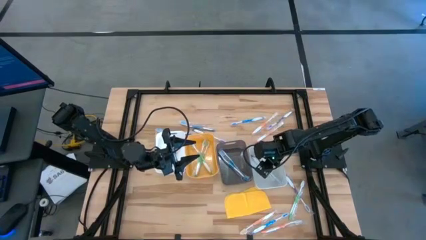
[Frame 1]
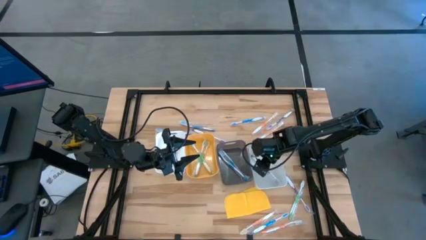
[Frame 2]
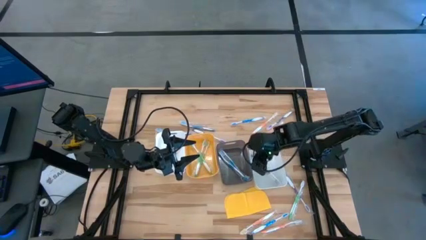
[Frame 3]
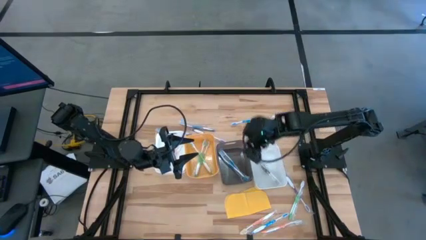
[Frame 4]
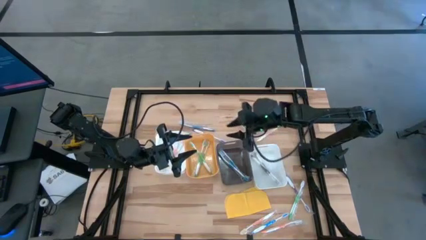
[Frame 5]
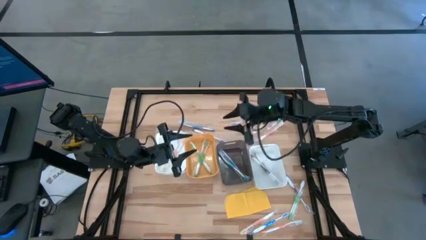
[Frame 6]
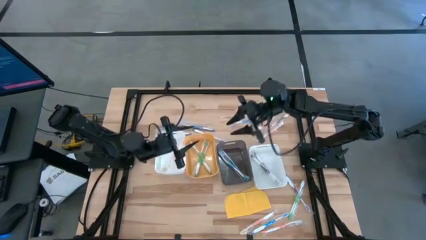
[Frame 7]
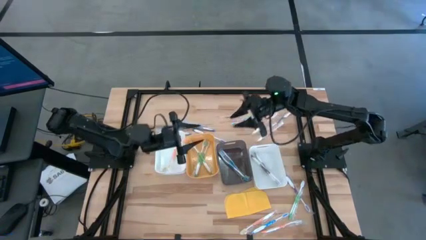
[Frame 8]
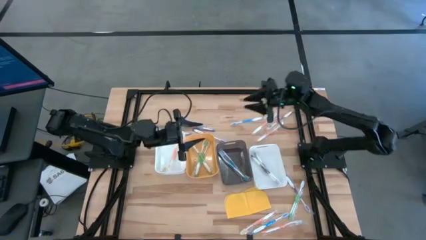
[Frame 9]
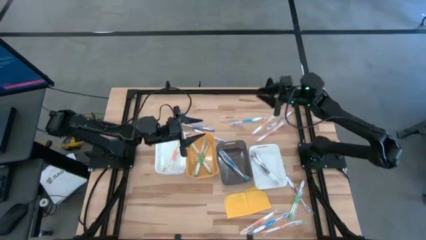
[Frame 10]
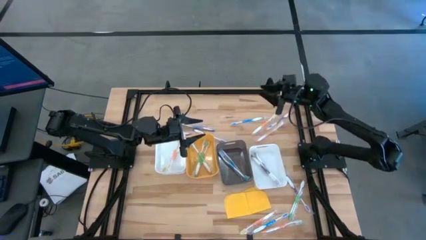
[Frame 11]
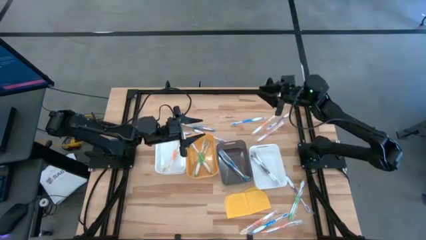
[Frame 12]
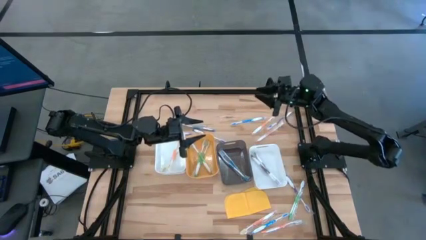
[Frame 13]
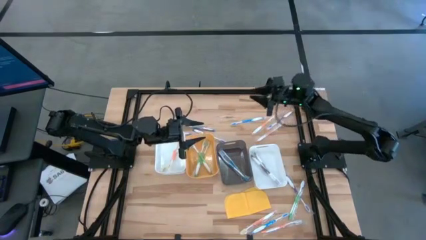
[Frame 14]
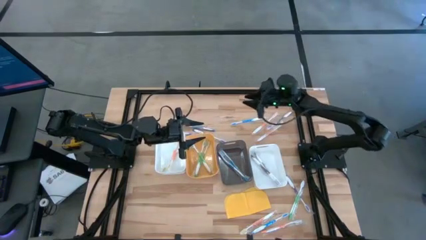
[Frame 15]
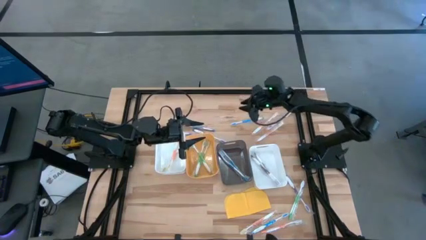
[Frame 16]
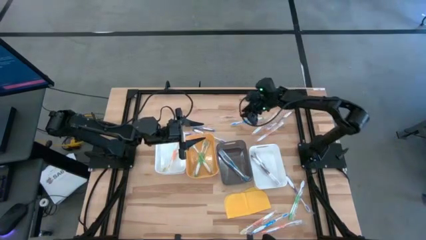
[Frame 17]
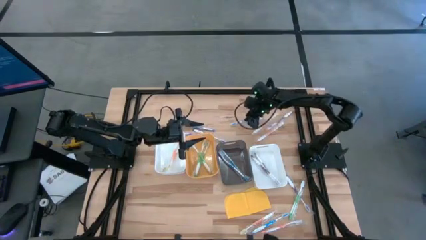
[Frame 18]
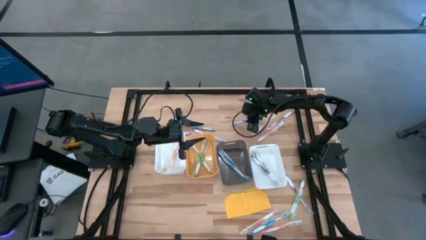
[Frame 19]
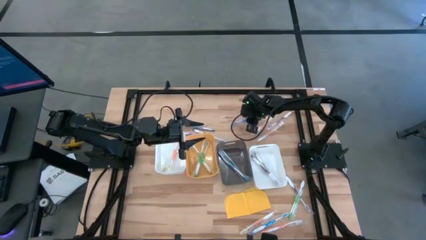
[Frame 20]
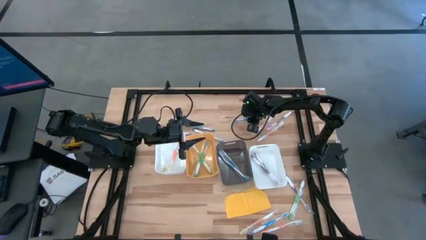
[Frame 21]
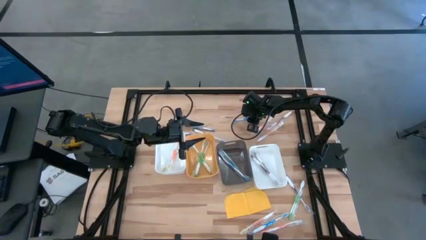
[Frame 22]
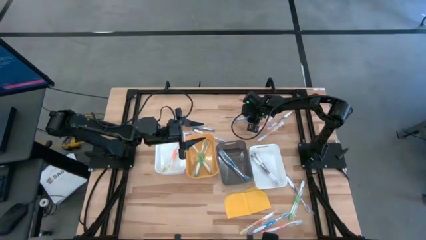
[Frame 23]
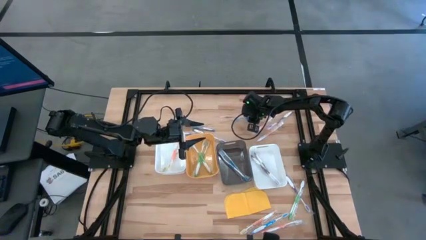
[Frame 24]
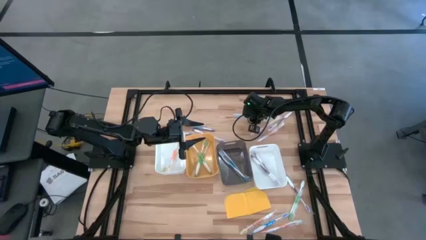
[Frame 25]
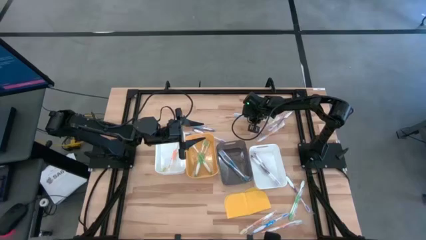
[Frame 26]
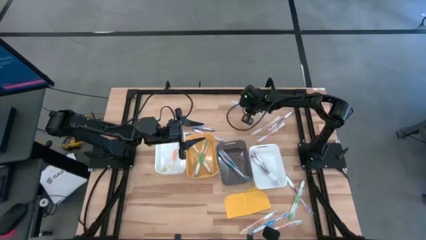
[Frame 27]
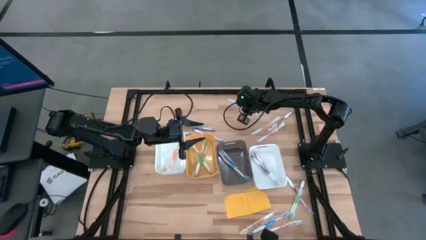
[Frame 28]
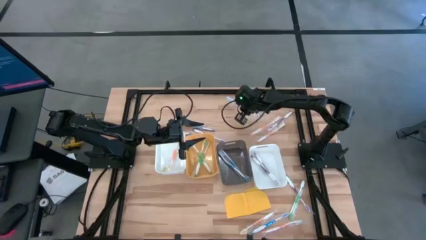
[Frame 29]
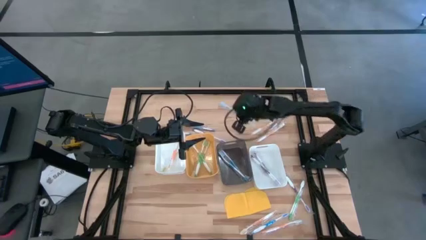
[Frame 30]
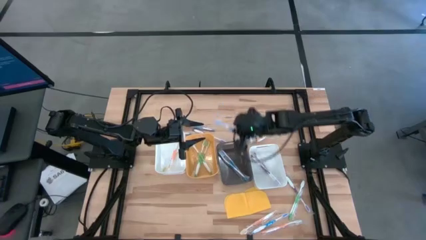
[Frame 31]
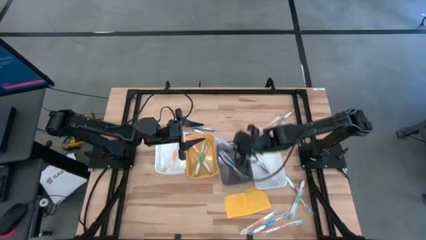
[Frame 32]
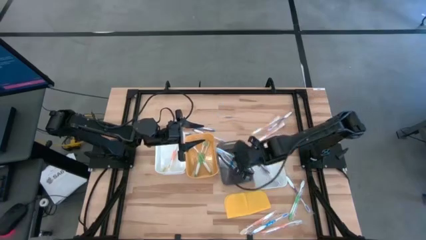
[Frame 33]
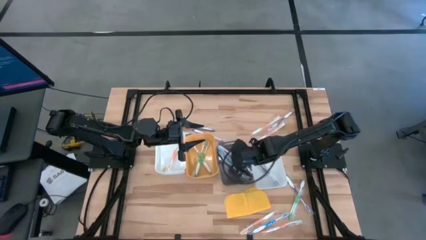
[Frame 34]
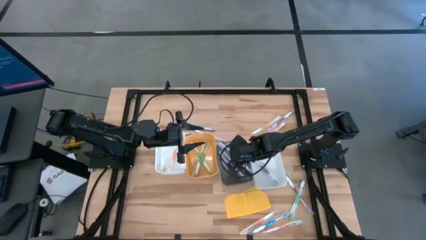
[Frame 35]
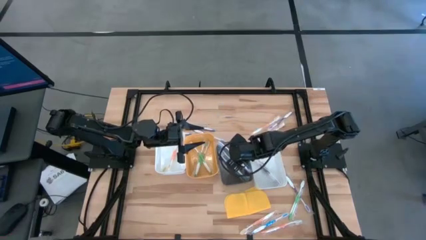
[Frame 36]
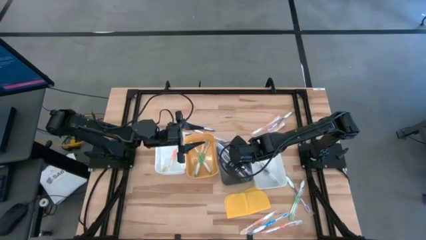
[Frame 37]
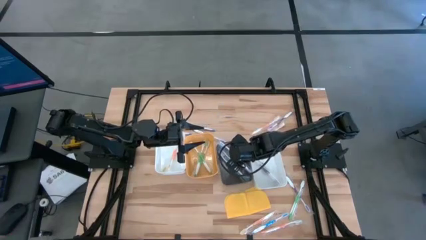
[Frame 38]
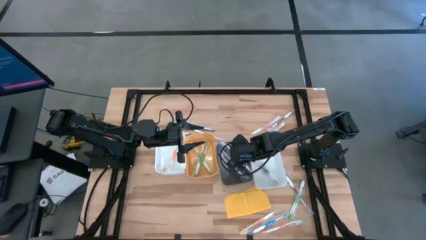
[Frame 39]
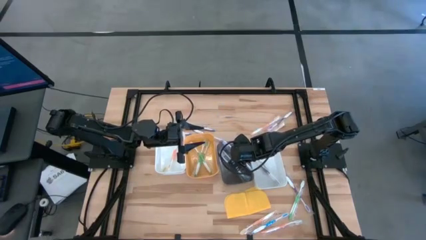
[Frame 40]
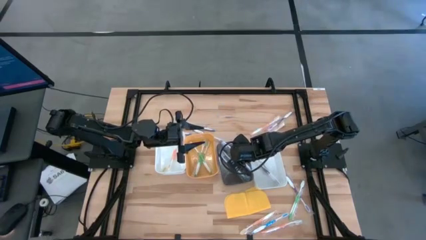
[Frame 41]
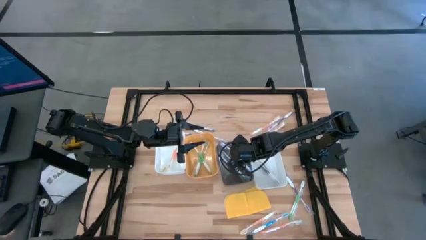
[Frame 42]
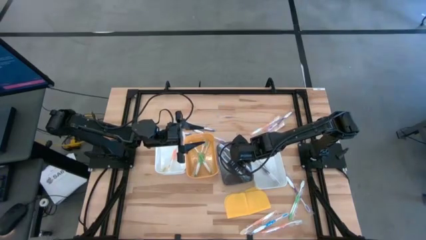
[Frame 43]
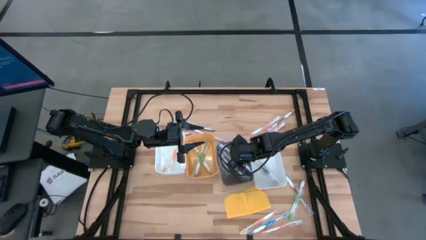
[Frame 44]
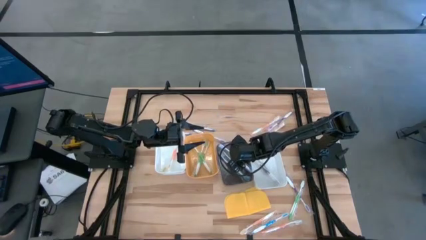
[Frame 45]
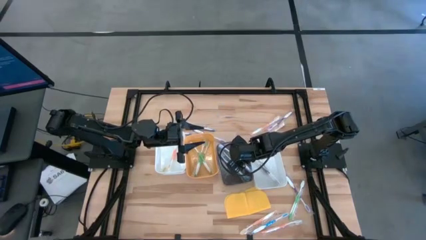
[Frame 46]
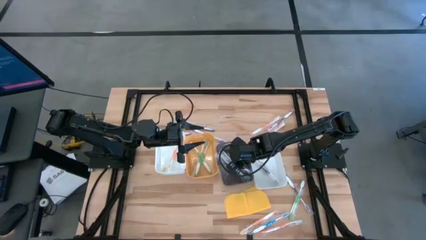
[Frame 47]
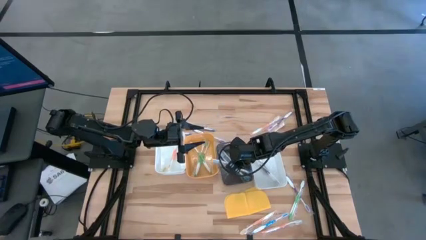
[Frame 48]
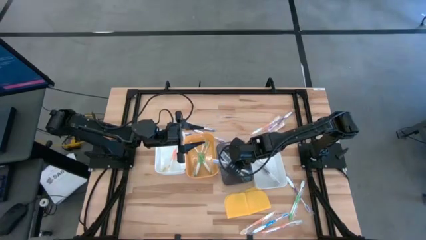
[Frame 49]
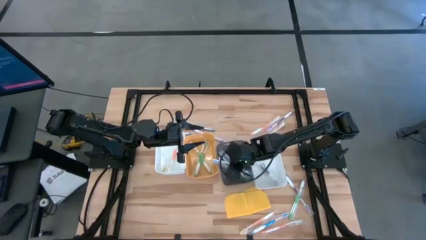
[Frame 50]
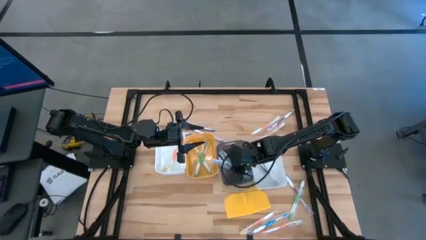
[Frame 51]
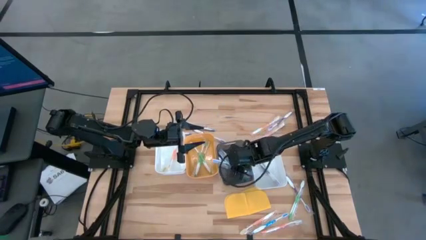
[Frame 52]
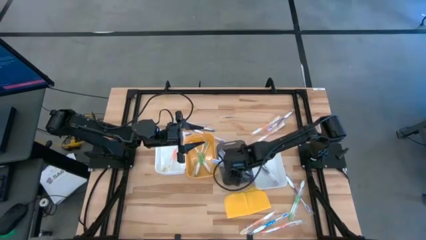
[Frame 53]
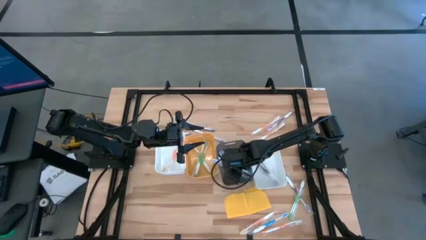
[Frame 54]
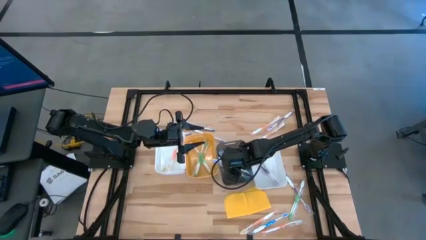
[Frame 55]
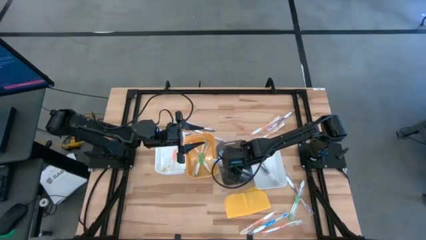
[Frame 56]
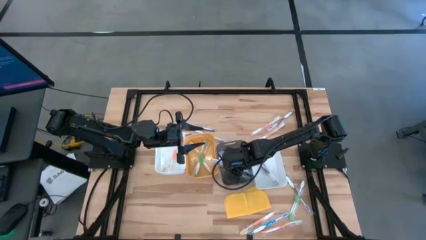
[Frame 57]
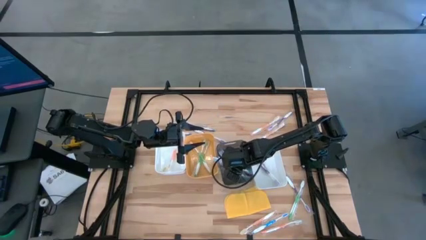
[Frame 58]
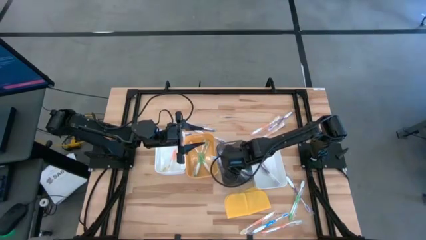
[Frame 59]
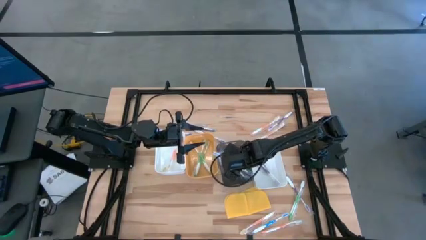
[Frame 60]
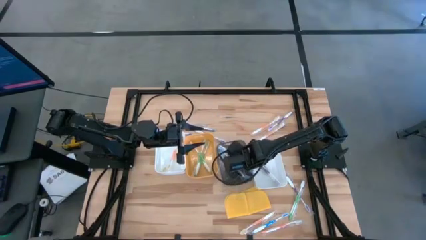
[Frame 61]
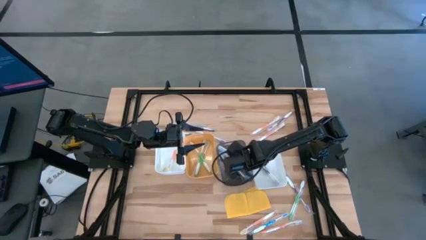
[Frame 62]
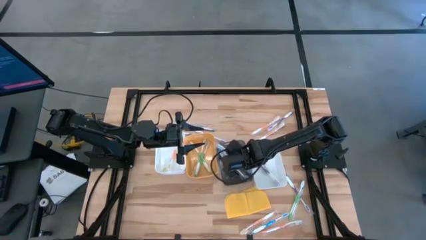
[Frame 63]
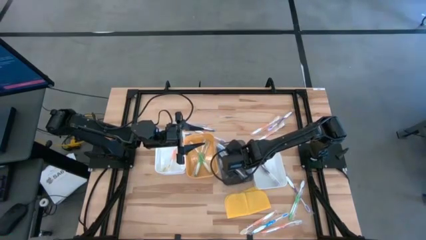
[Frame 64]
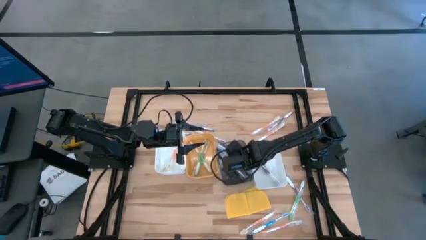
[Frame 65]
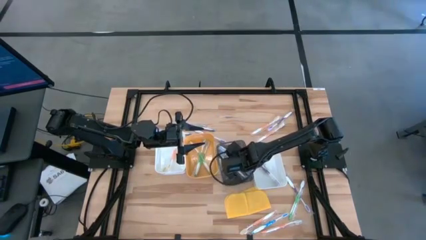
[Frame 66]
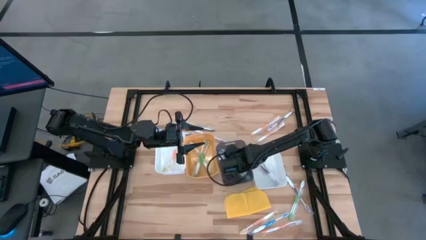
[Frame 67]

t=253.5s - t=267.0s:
Task: Pick & Place Toothbrushes
Put the blue toothbrush into the black bin

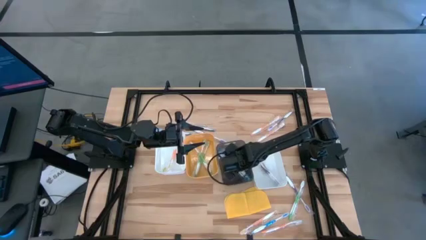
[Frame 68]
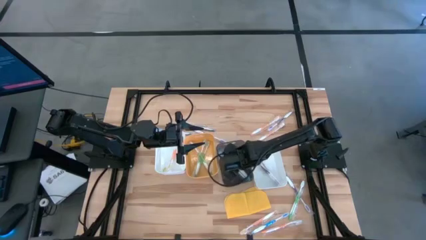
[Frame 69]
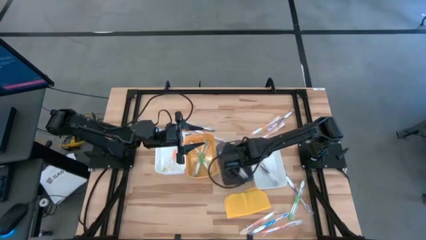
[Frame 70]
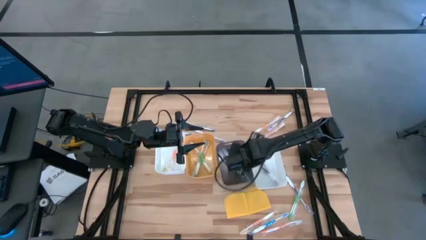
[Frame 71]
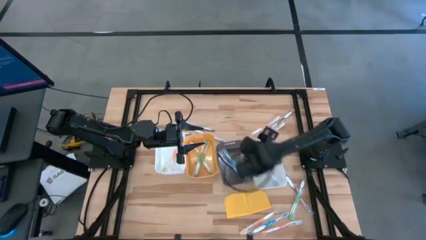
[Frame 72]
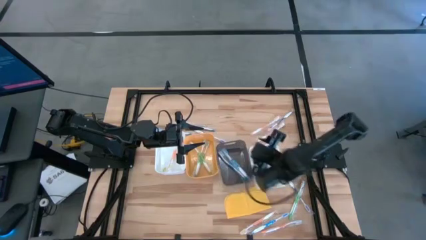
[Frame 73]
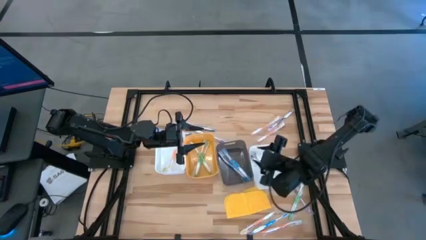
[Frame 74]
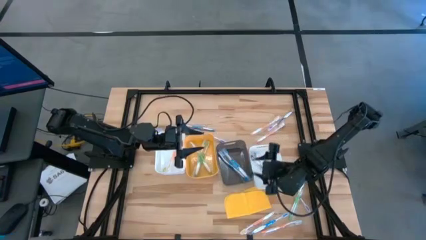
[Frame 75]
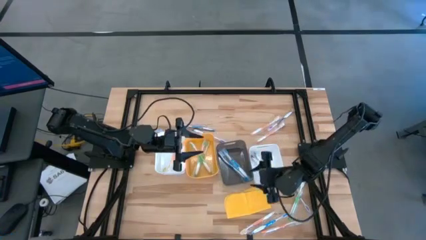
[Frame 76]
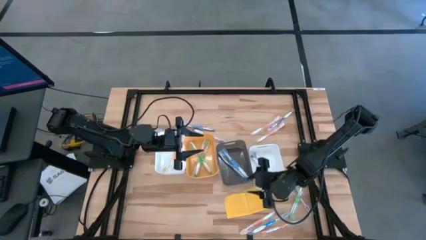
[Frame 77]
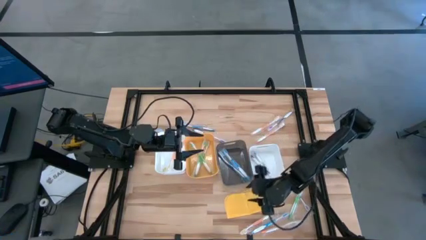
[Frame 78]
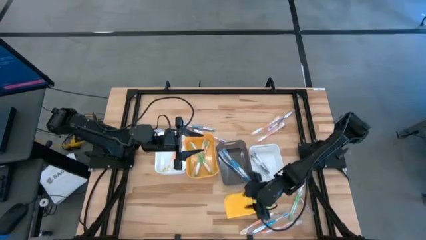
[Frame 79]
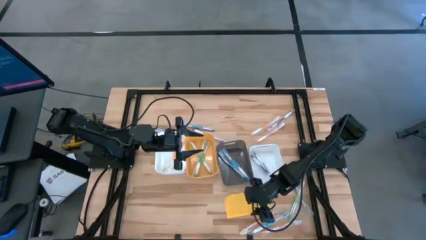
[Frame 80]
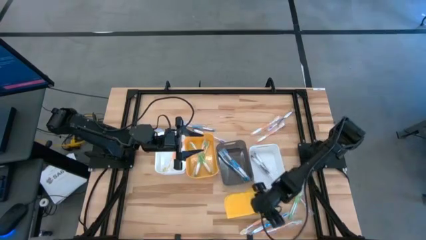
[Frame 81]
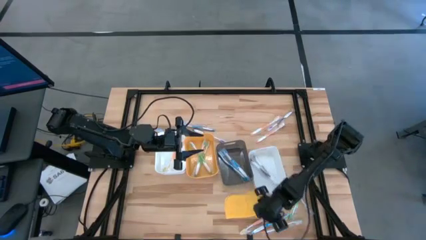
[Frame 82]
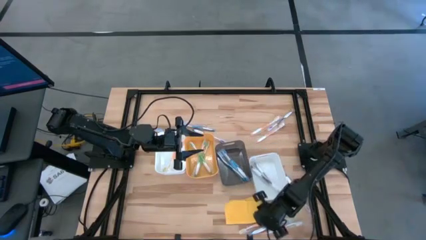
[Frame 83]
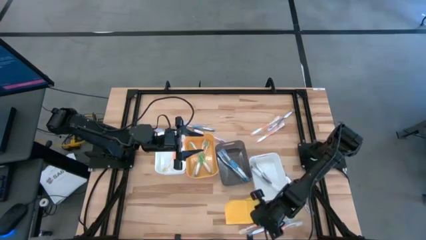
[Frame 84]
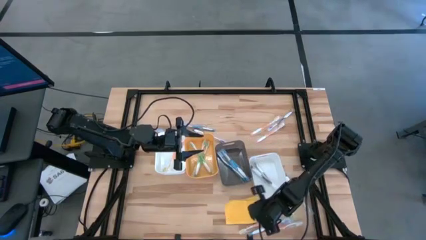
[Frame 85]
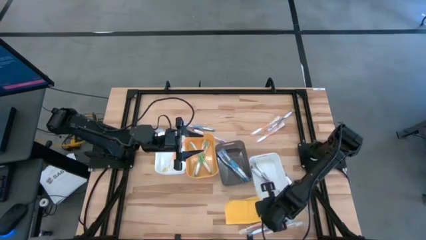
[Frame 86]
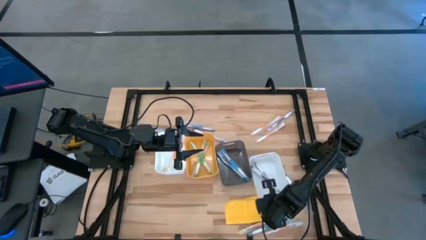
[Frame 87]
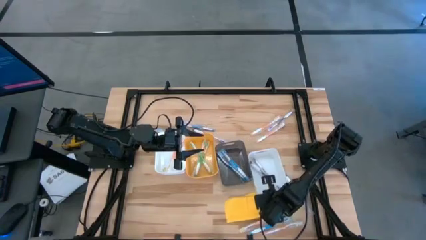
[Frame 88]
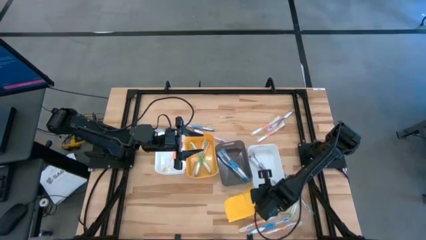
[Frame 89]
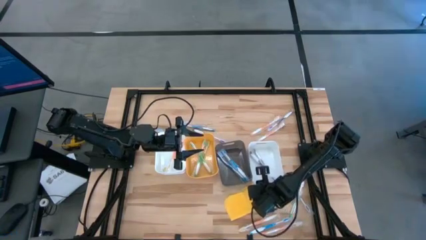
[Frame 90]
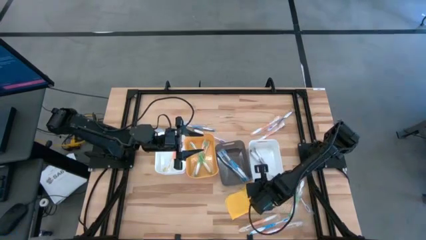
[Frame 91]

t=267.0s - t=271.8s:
Adjust the right white bin
